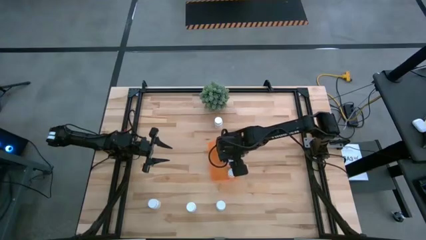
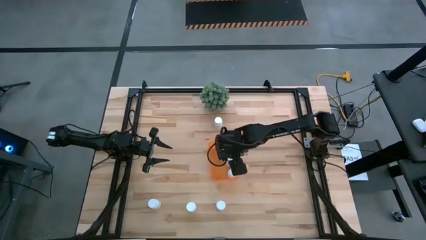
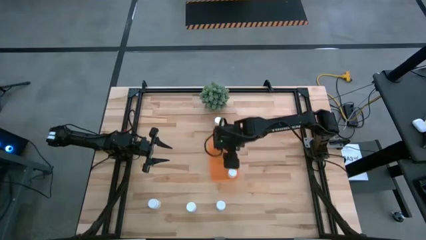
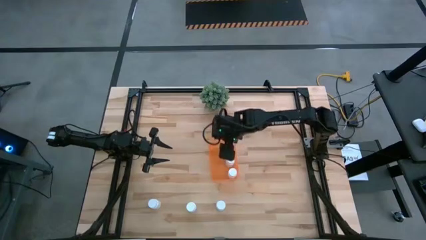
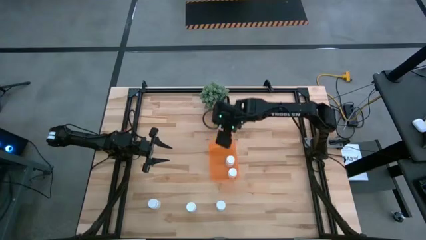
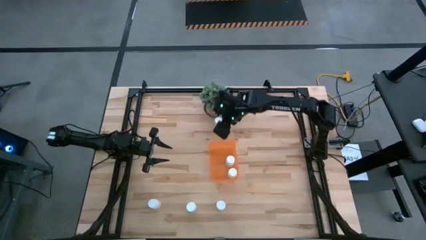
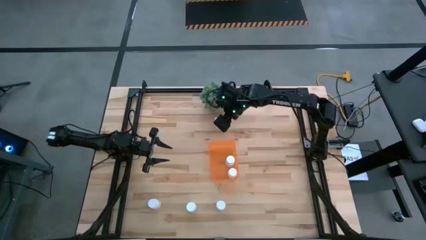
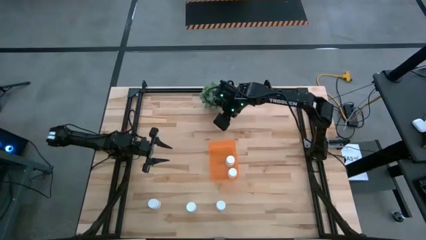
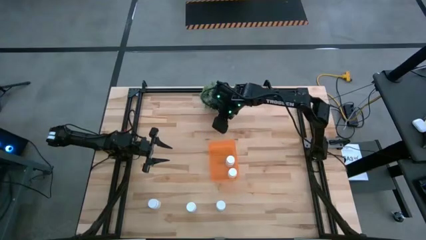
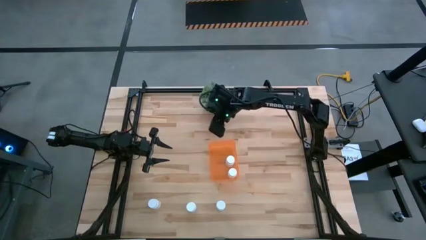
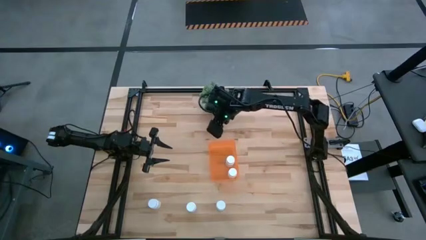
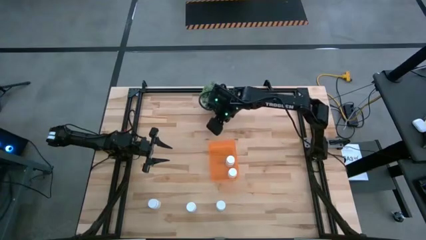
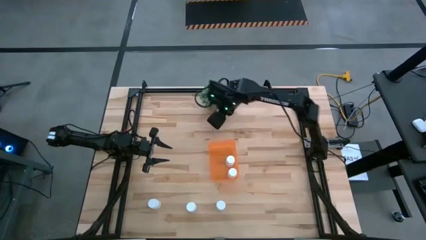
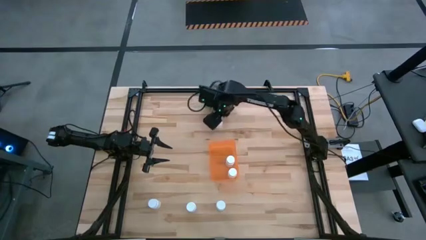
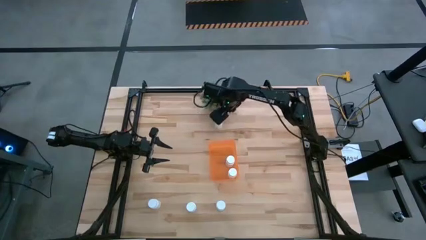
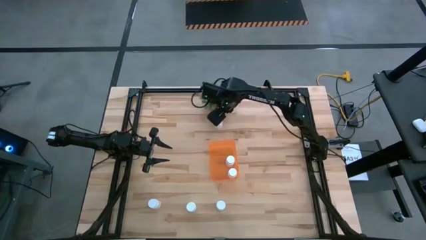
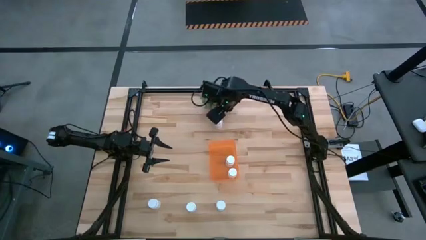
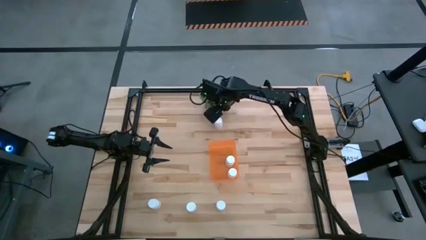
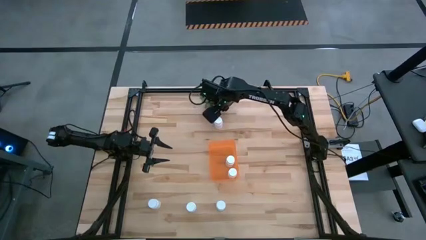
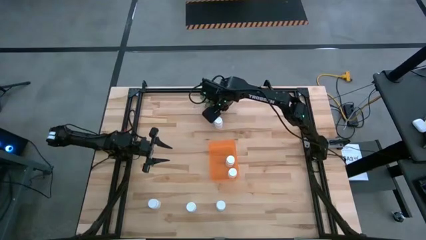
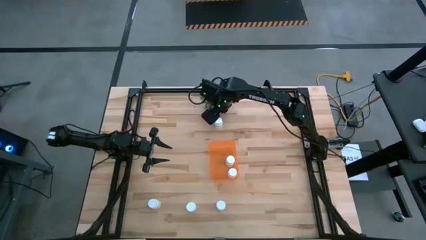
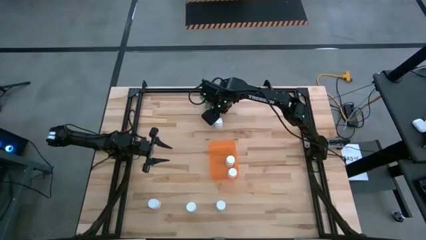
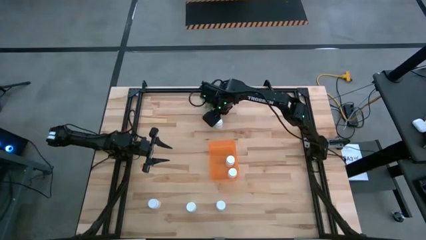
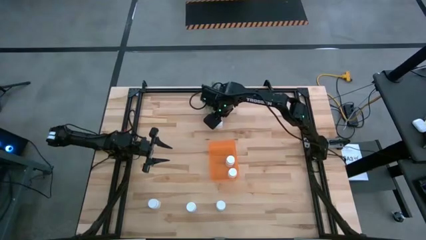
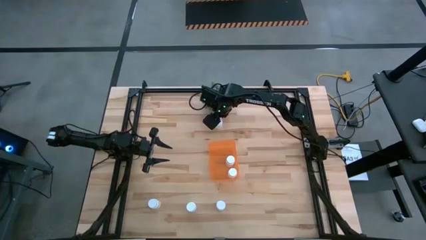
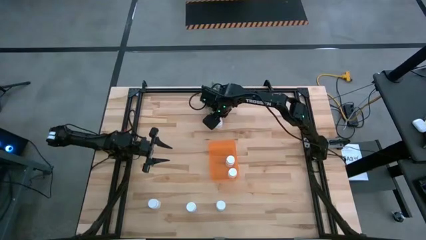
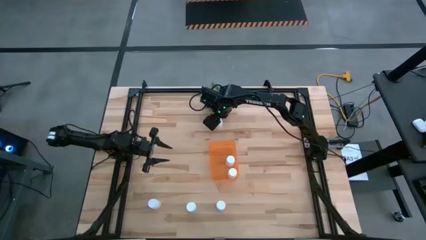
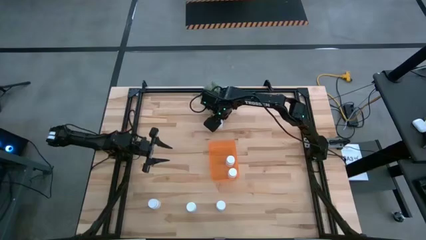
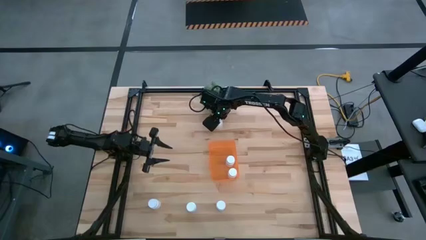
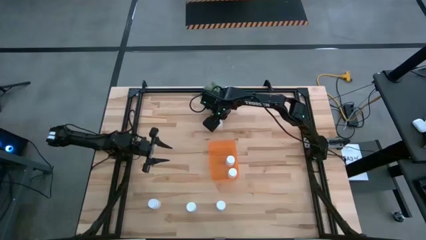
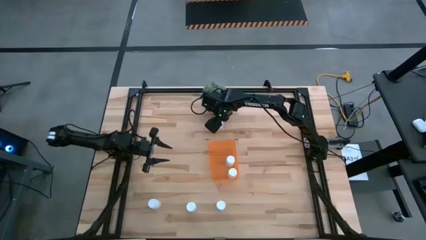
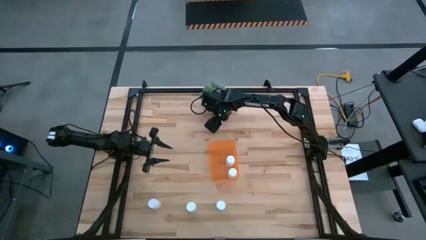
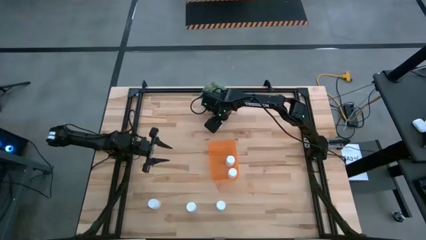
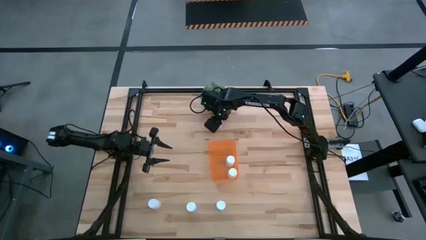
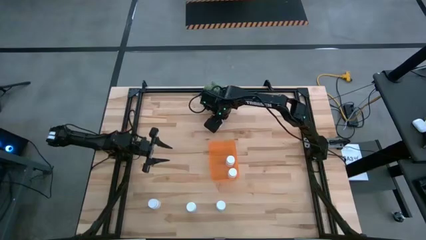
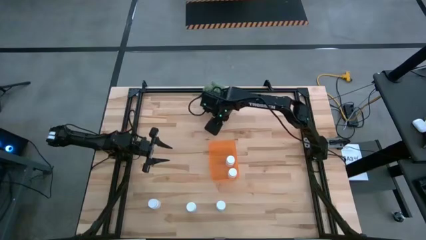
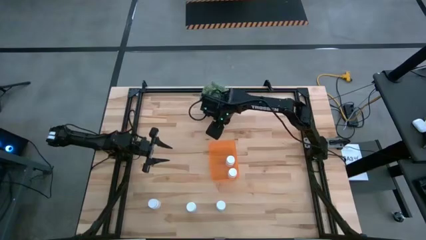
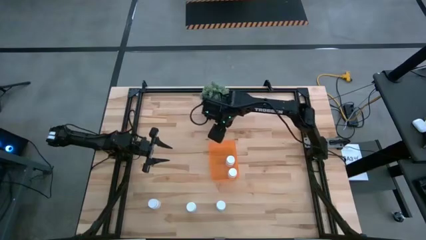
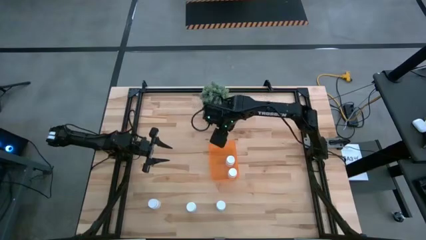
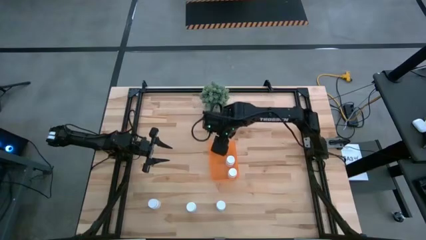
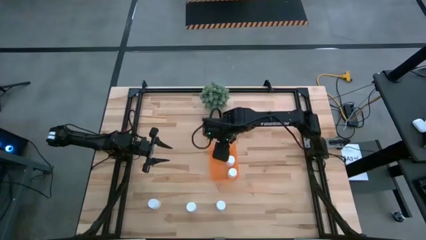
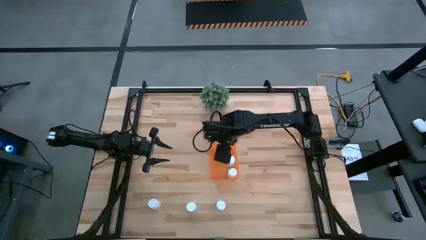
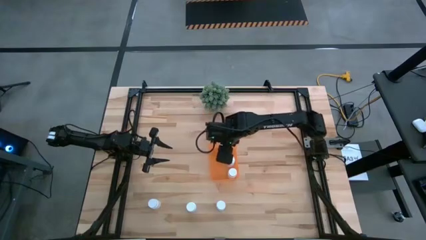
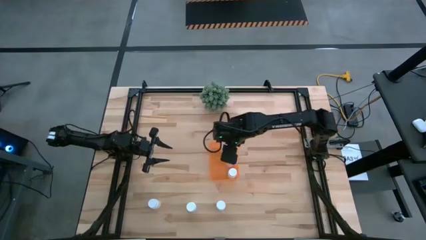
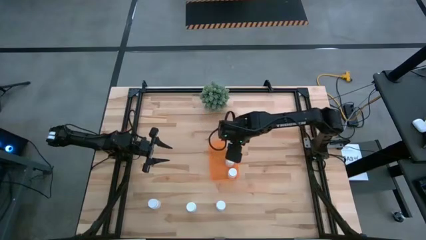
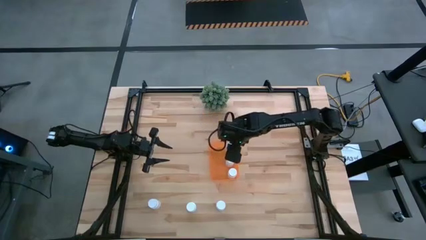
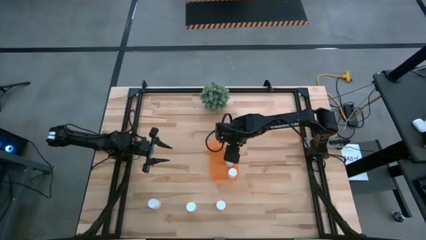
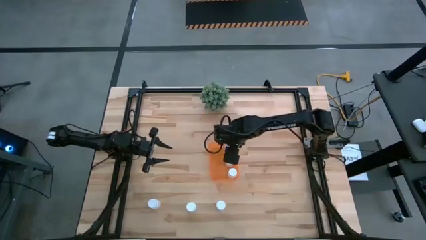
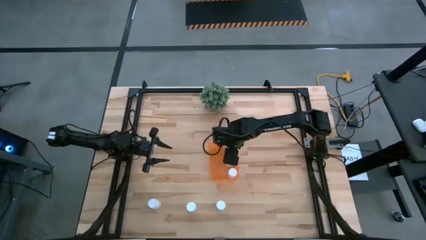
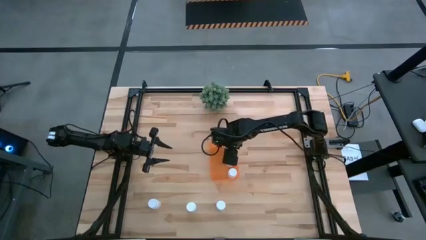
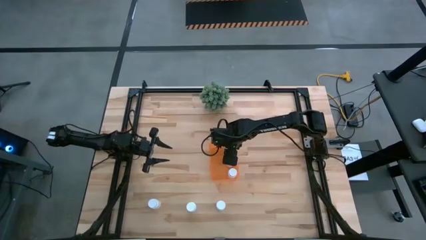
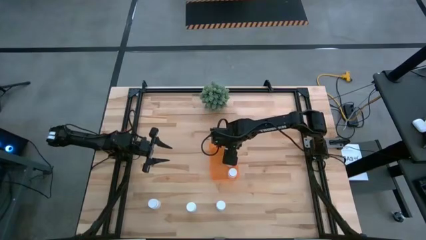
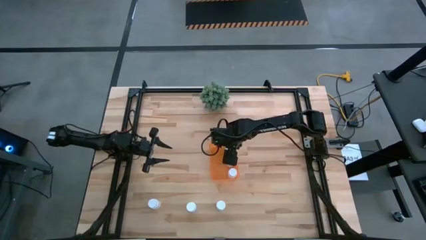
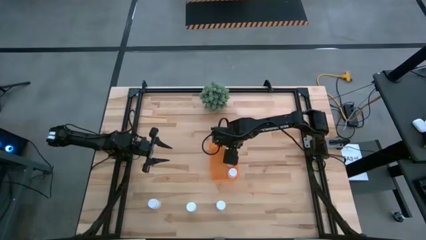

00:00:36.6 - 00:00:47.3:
Task: Pick and place pill bottles into a basket
Put the white pill bottle into the orange bin

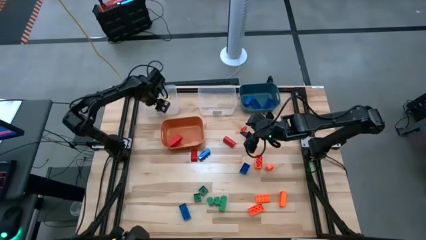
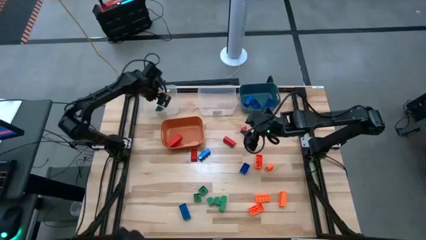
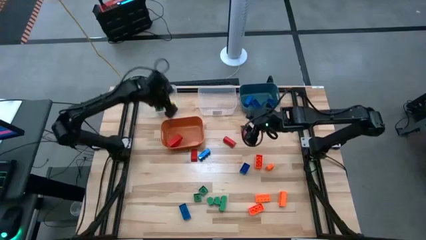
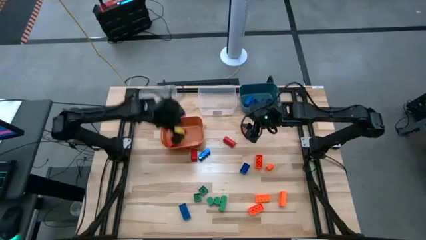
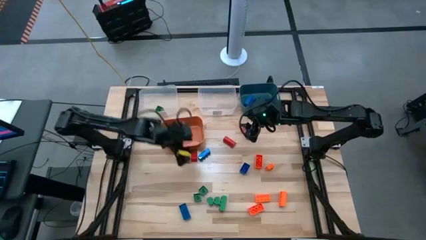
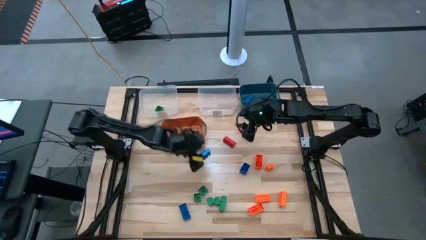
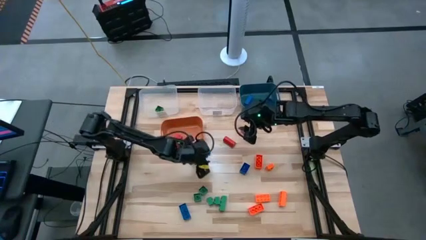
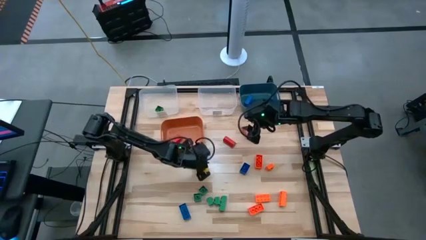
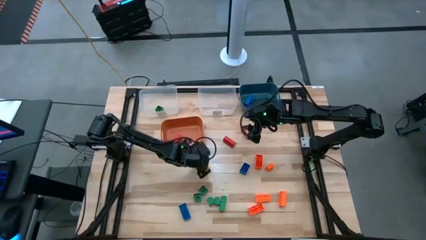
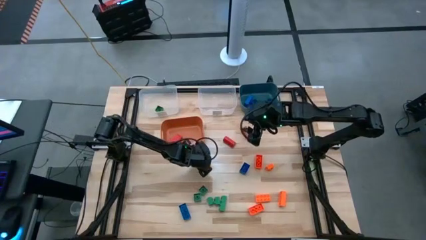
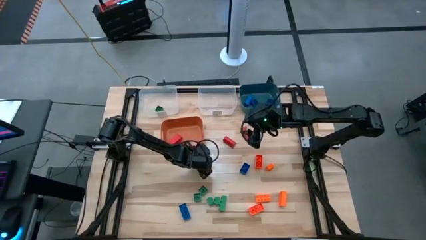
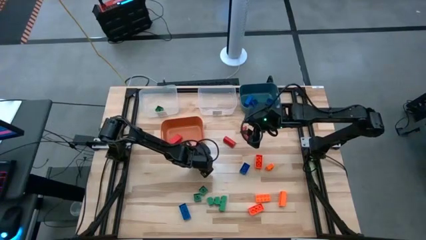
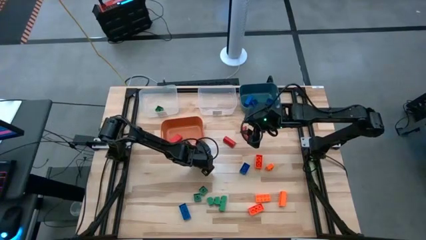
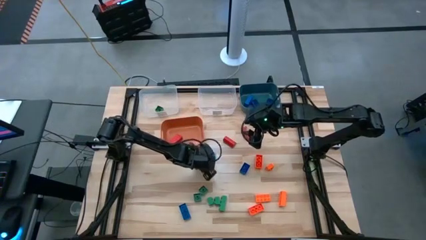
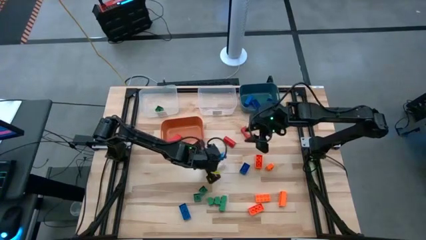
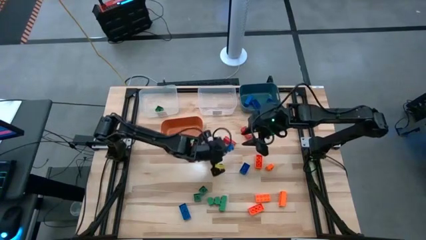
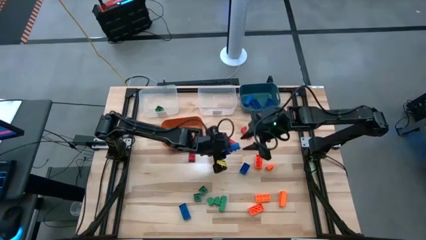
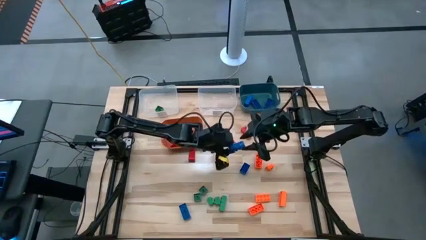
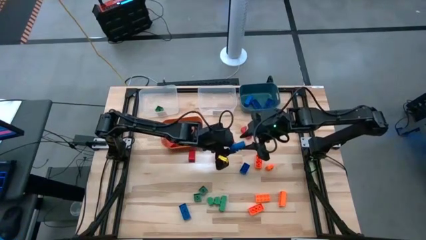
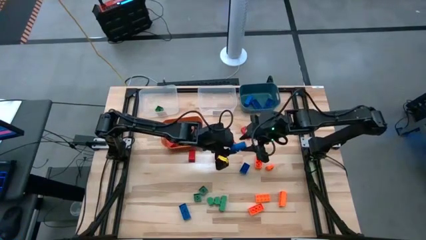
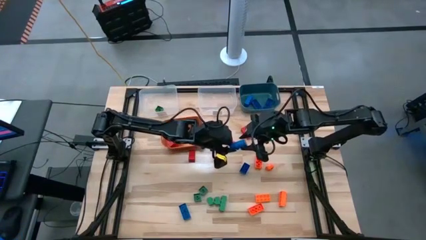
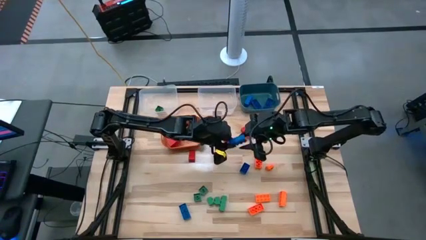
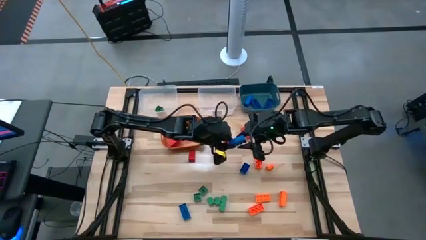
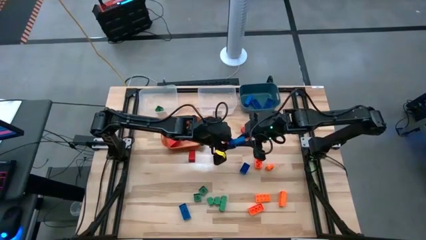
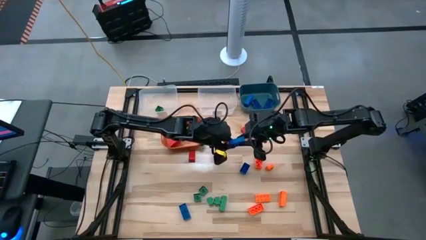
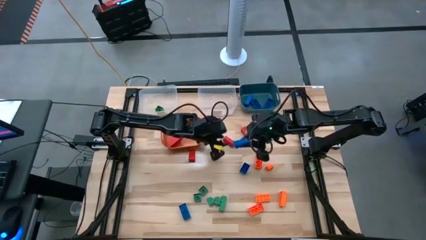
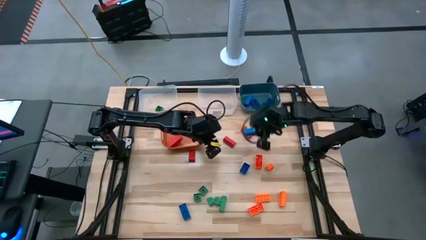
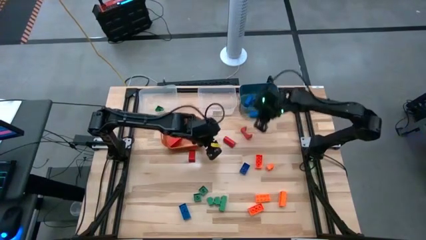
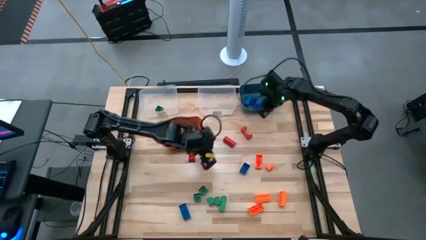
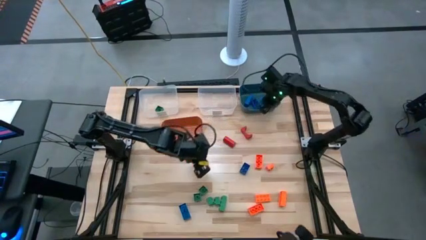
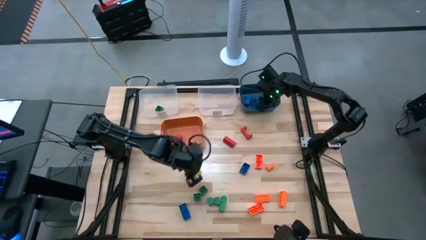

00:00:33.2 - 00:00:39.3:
Task: Sort blocks
Put the blue game piece into the blue bin

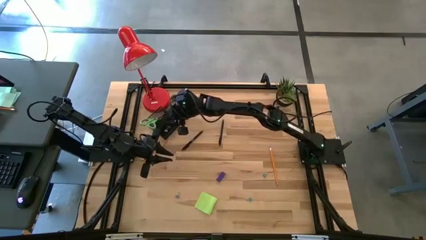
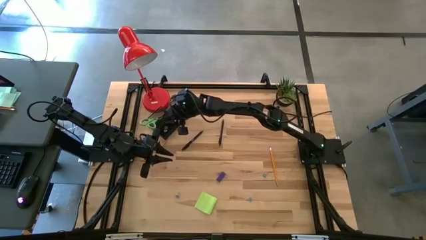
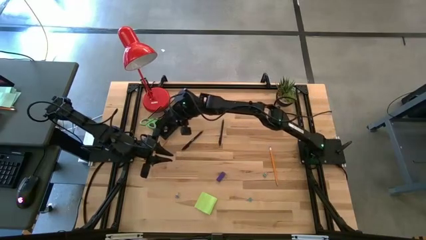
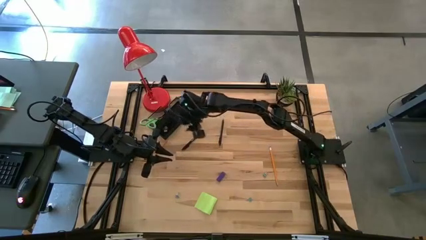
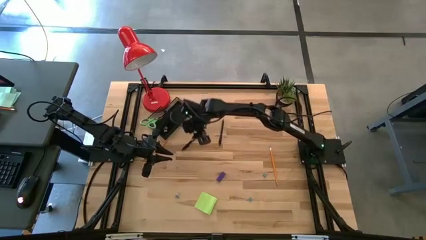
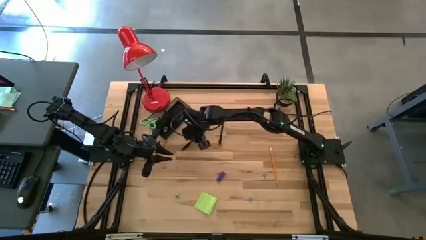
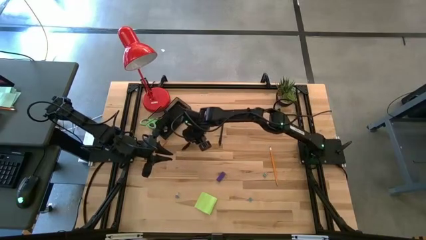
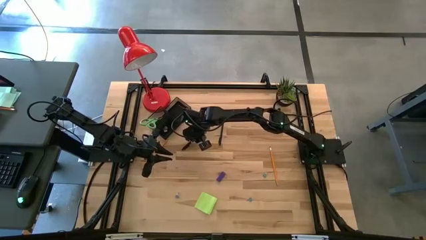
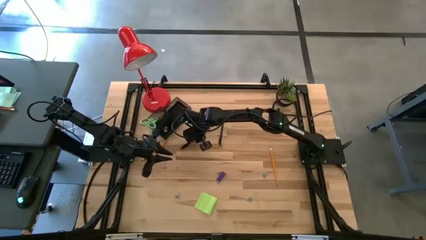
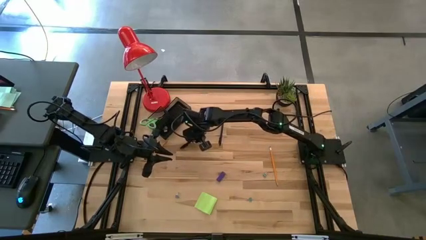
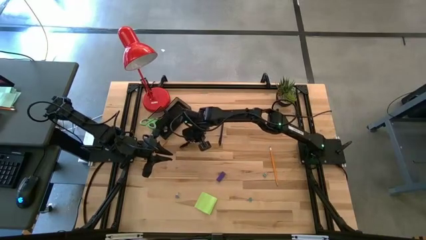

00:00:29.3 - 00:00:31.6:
Task: Pick and place office supplies into organizer
Put the left black pen into the desk organizer
